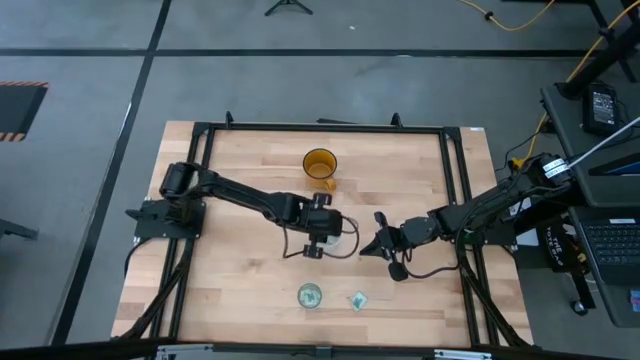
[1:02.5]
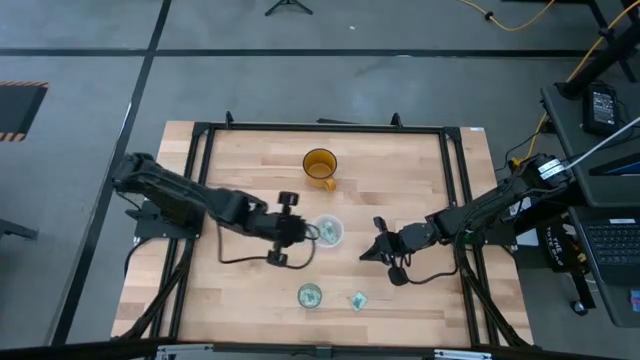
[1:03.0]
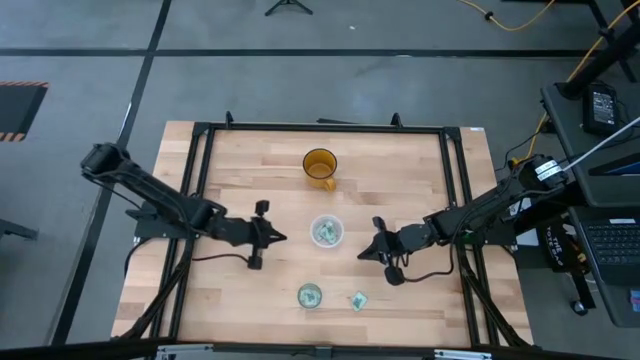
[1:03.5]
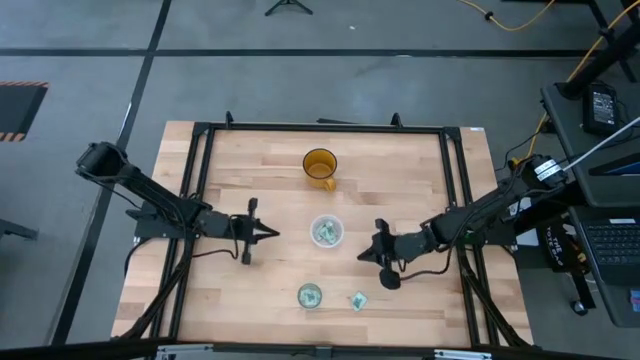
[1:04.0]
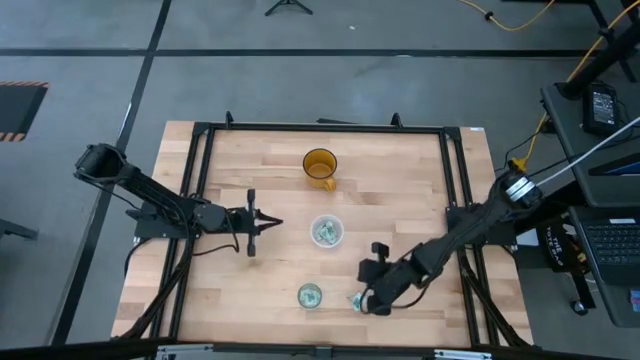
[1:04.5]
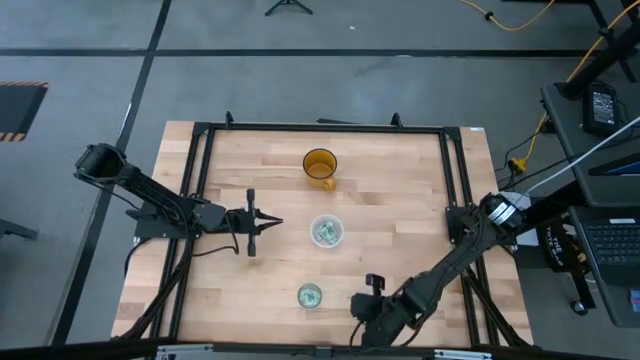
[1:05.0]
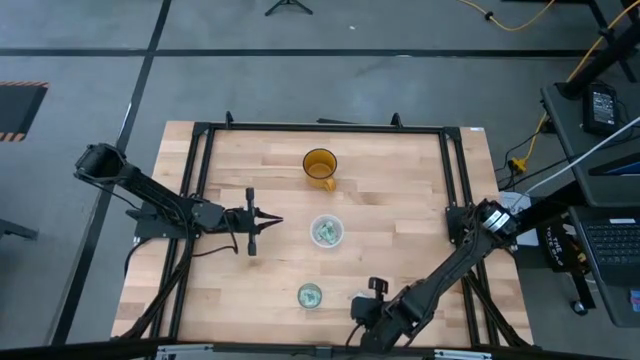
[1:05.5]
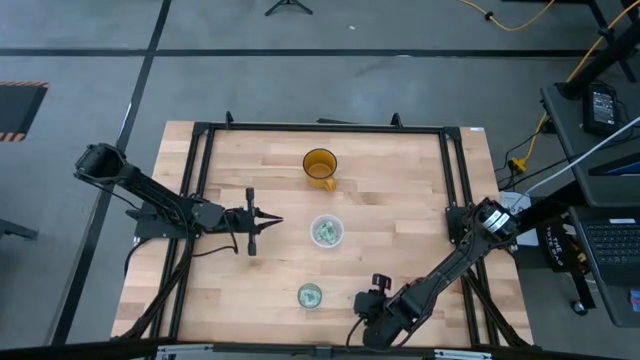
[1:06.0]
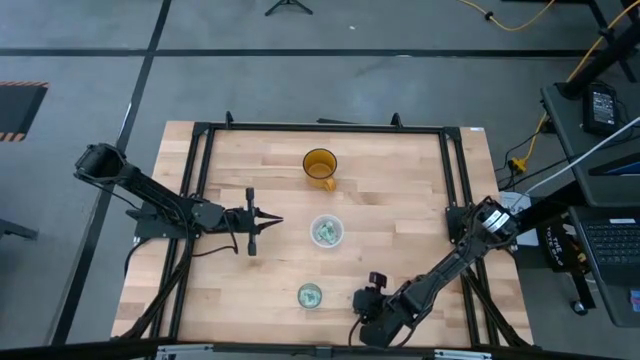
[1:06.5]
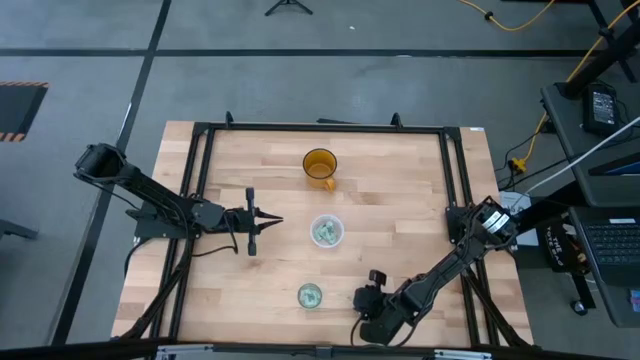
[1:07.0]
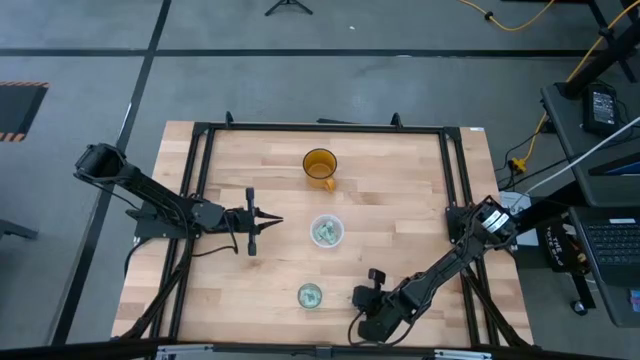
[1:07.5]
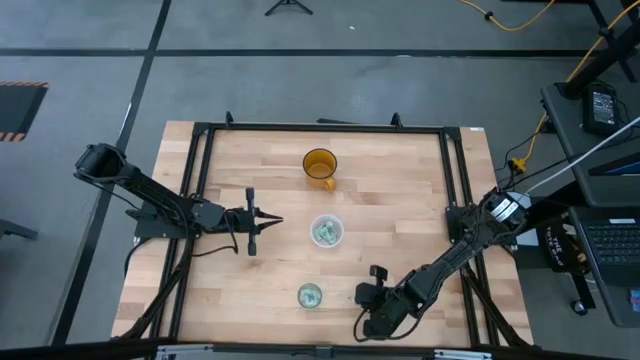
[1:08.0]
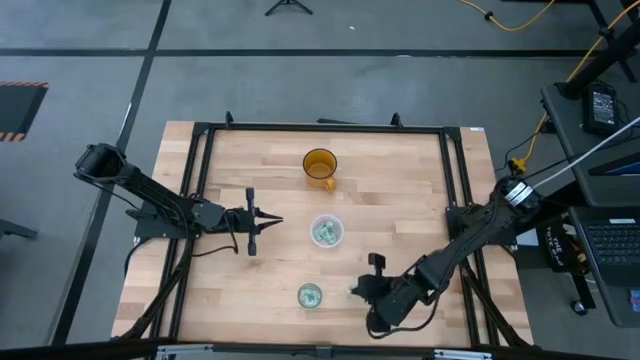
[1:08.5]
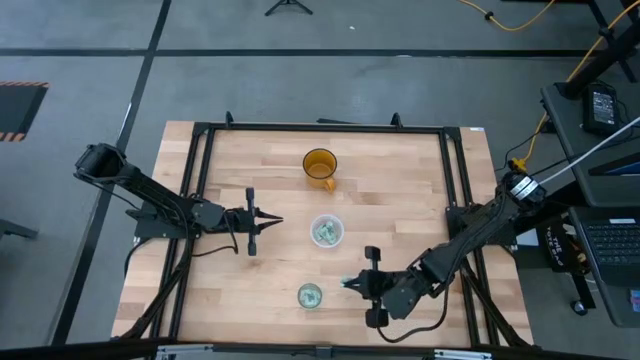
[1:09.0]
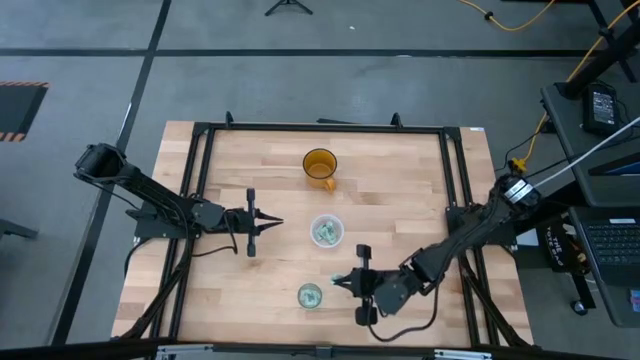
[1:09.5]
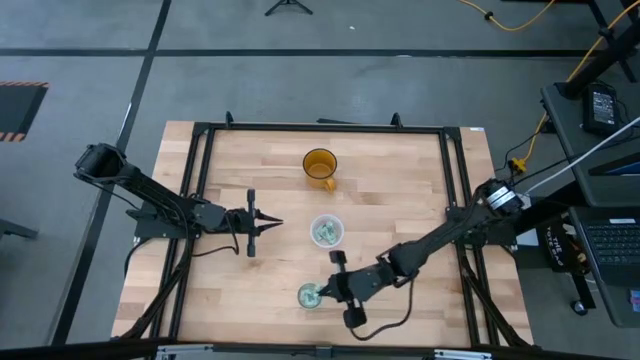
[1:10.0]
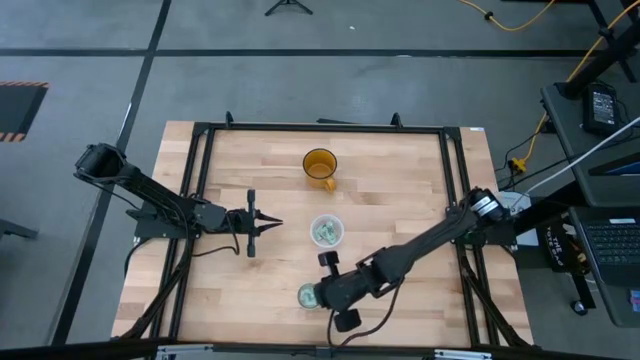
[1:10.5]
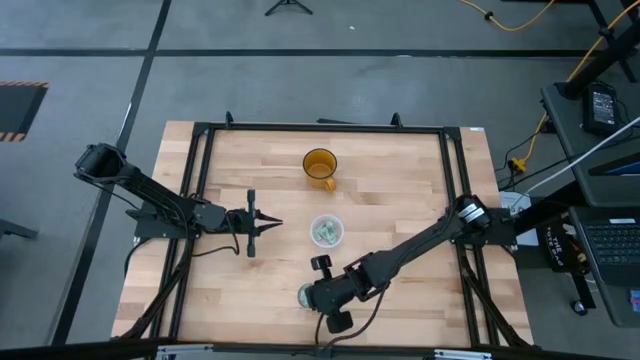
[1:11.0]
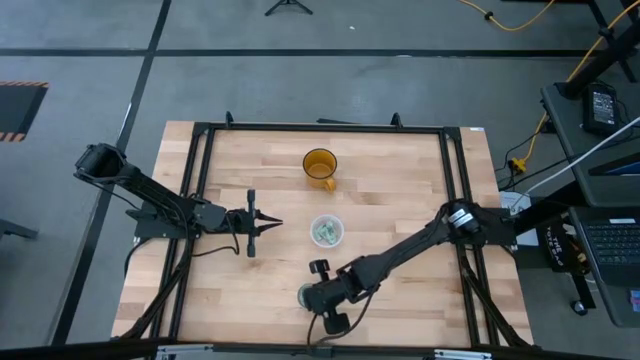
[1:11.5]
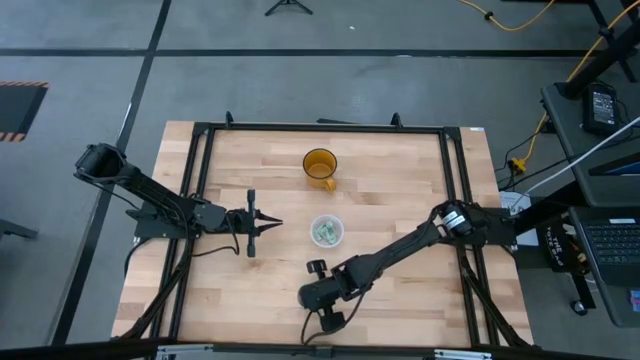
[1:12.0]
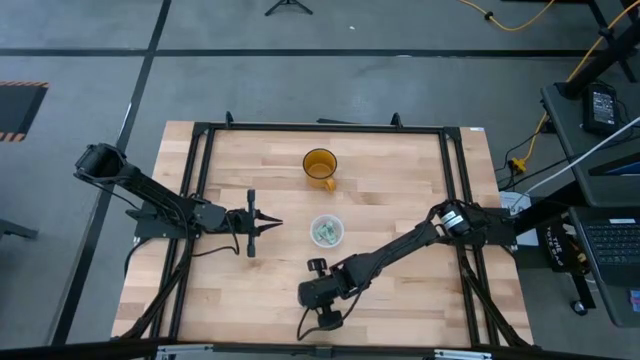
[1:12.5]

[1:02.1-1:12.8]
Task: Pick and place Stevia / Truvia into bins
Put the stevia packet into the transparent glass container

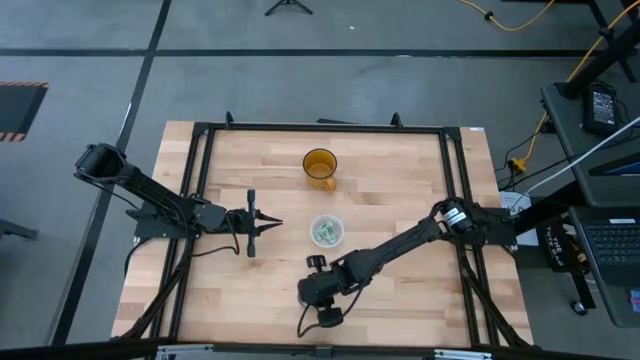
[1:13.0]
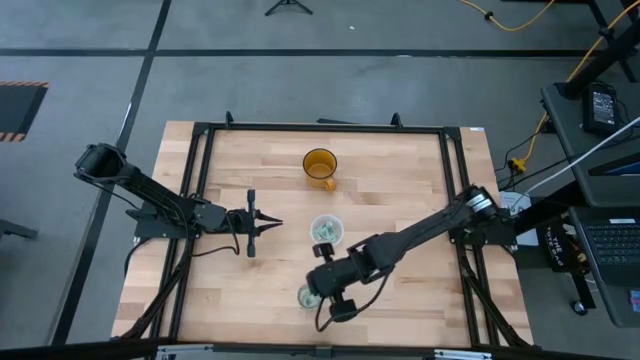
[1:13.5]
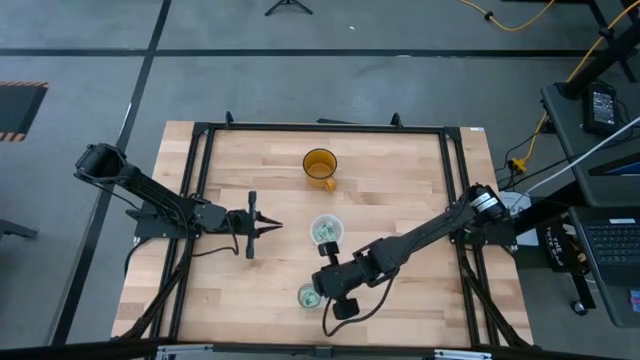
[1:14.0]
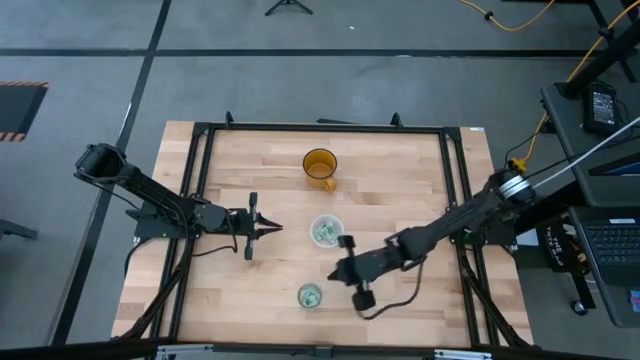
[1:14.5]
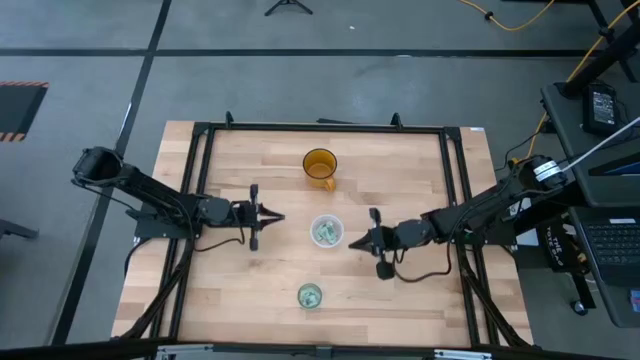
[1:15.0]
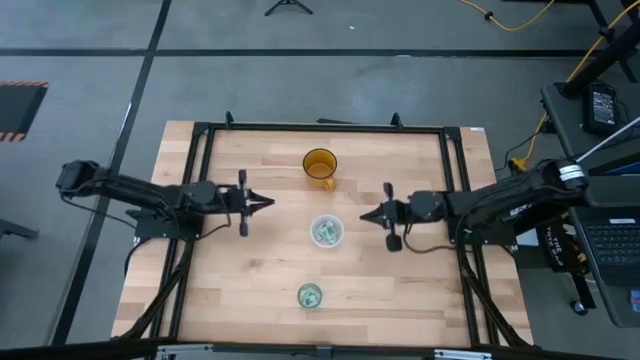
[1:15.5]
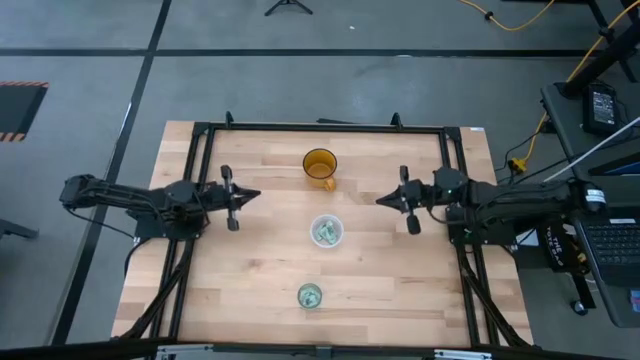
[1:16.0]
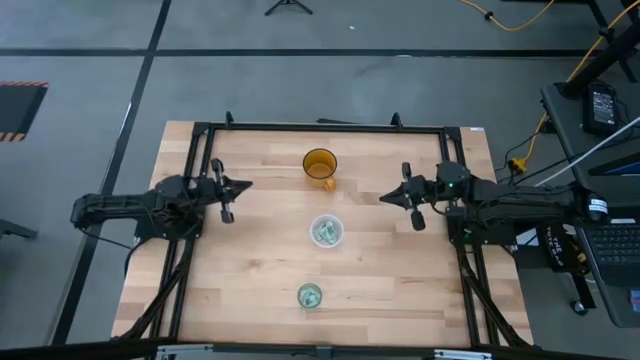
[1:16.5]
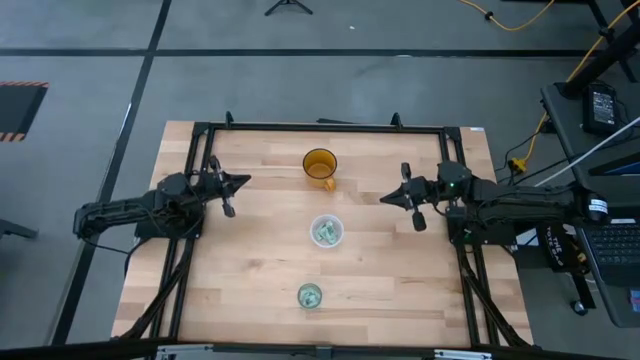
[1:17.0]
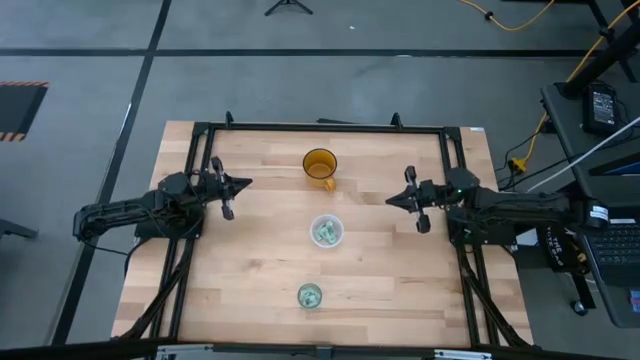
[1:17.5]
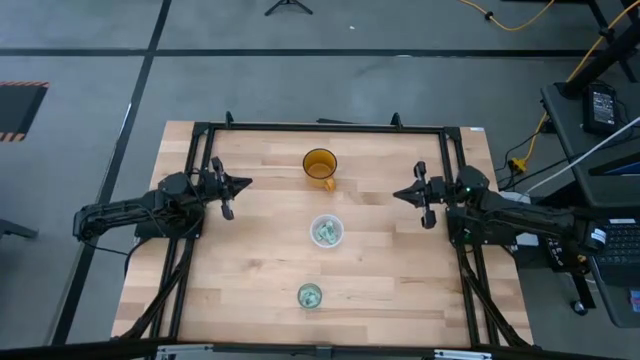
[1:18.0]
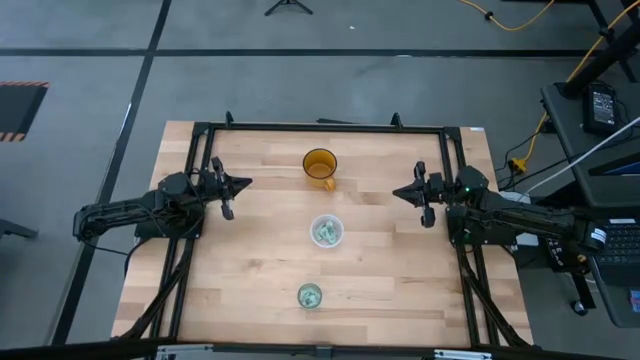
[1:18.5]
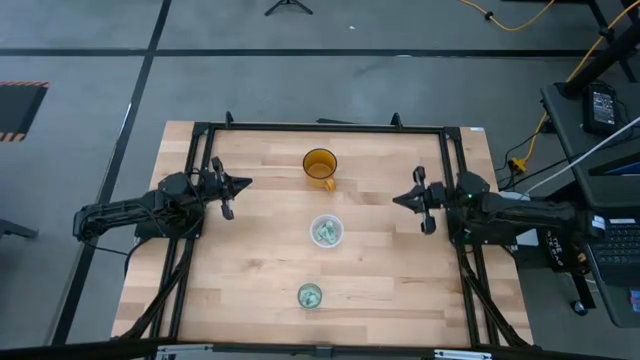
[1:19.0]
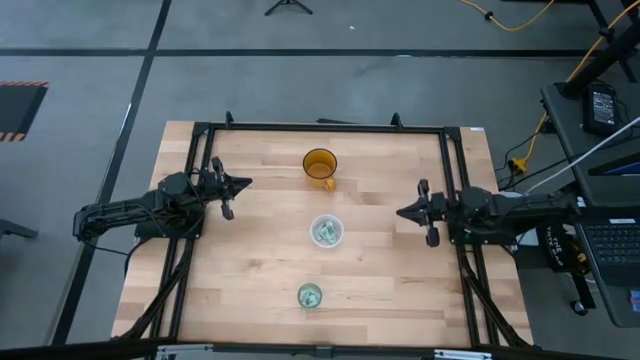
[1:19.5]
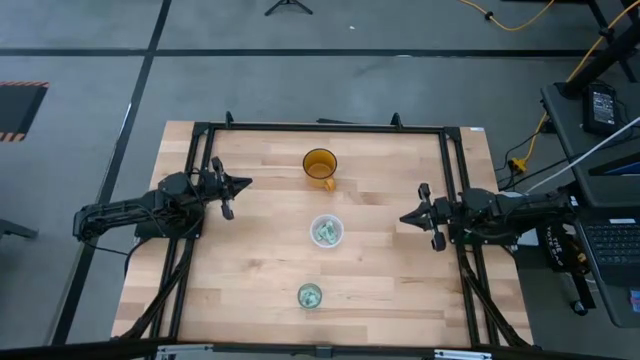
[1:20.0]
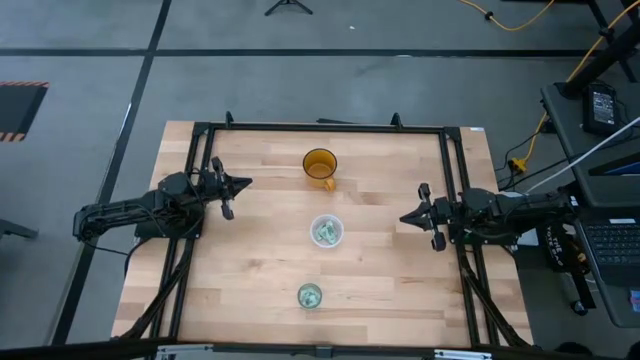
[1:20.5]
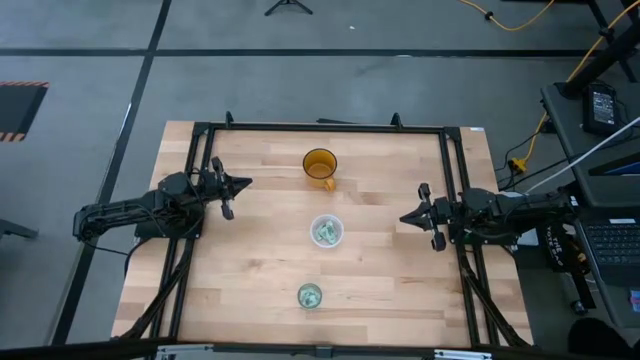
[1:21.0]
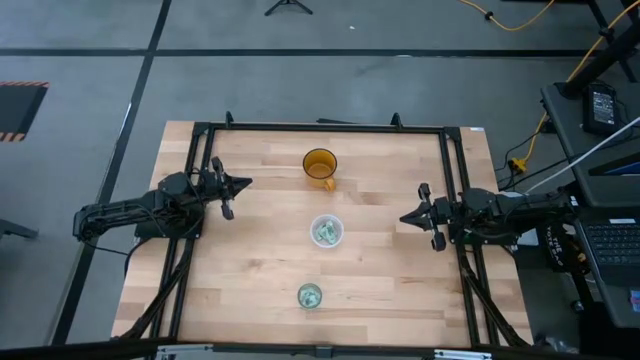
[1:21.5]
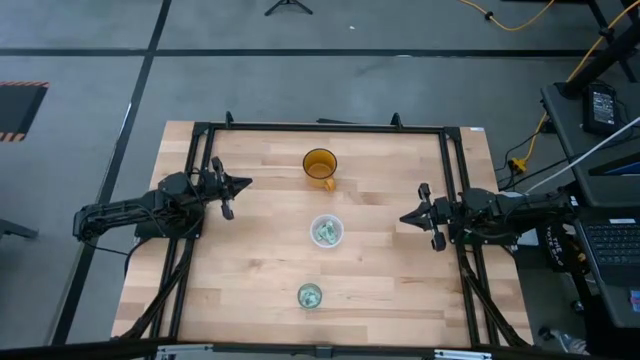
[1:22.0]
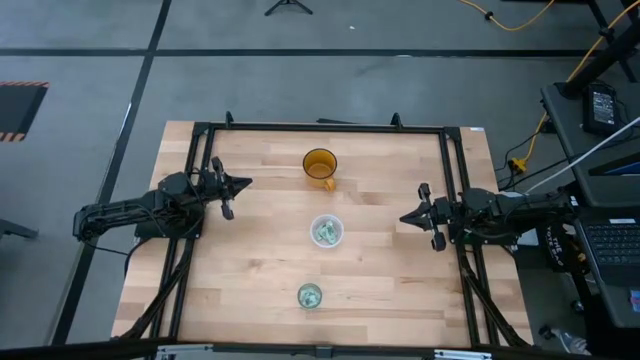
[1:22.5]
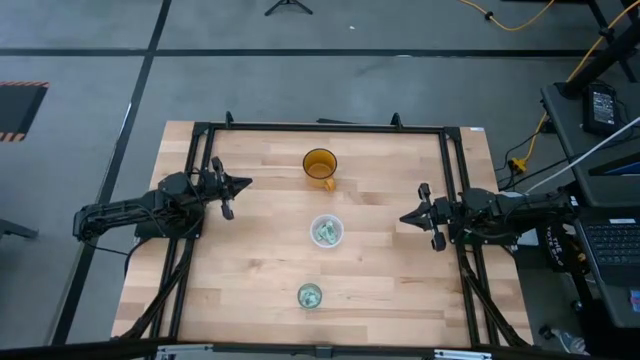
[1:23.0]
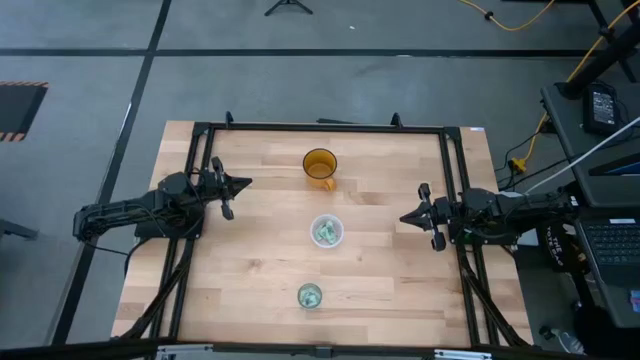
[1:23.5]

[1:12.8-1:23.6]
Return to Home Position
